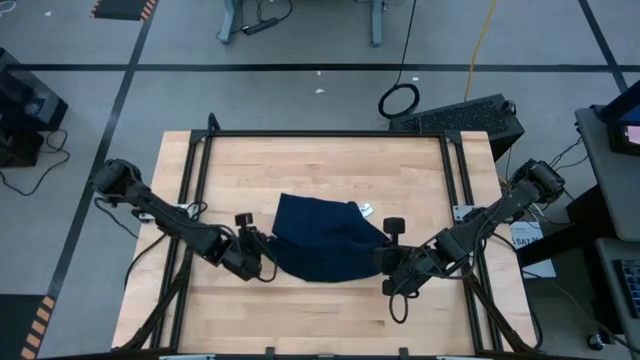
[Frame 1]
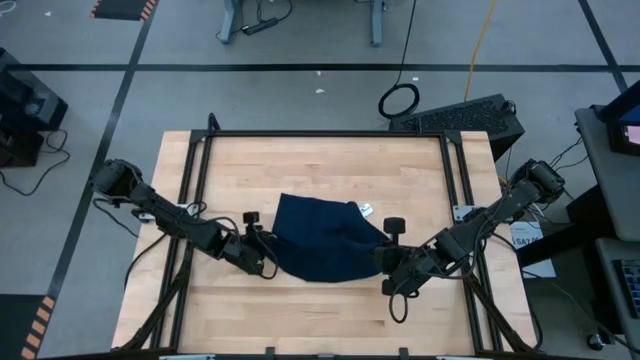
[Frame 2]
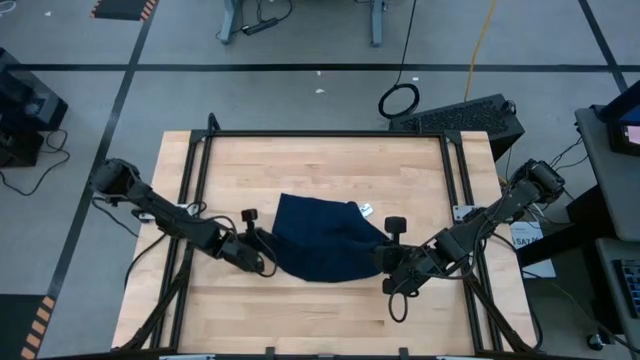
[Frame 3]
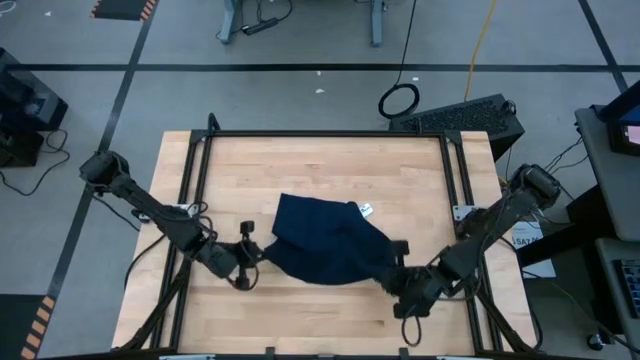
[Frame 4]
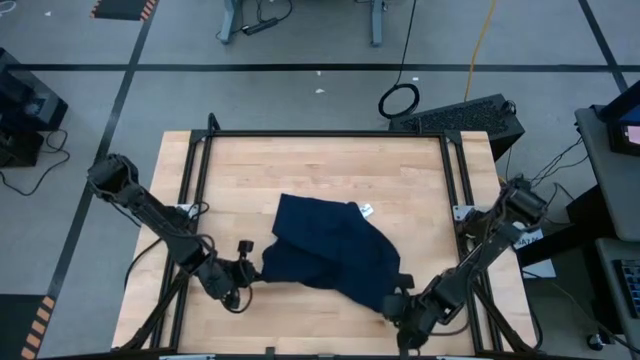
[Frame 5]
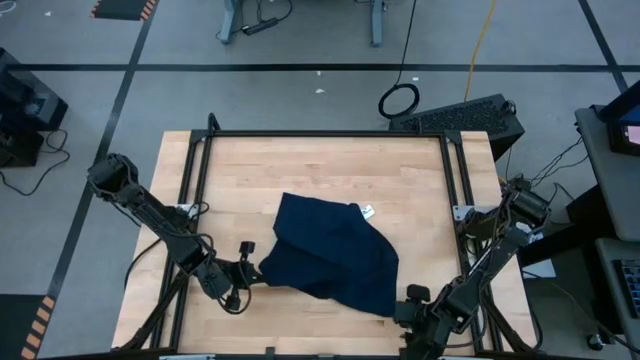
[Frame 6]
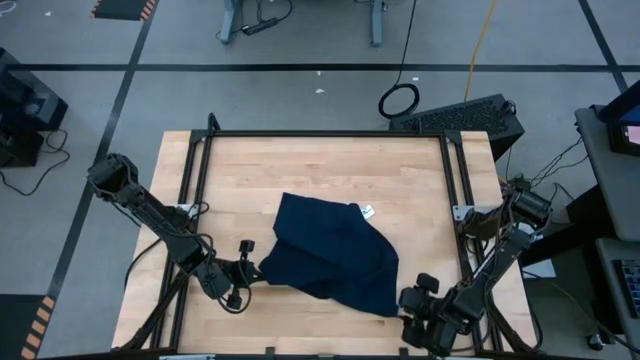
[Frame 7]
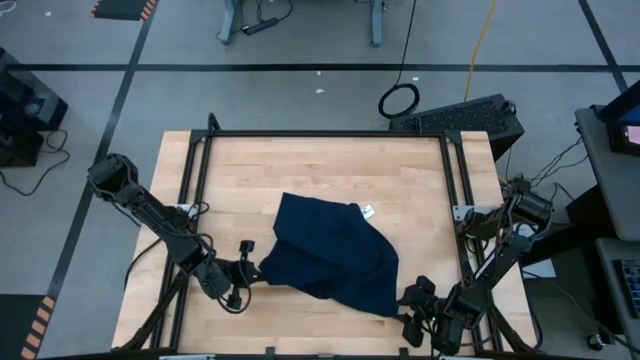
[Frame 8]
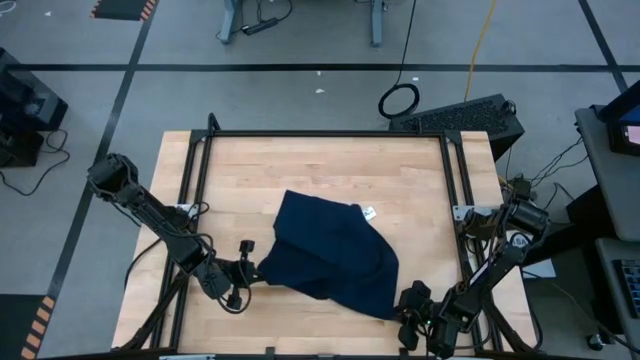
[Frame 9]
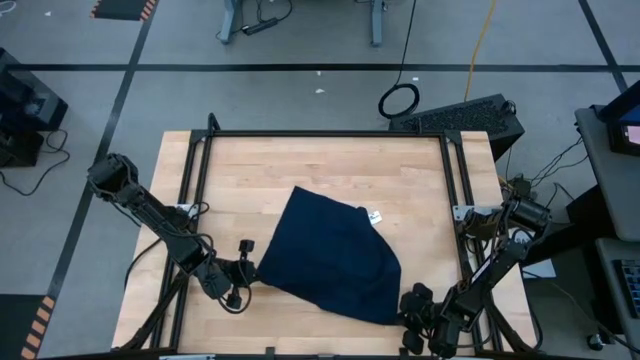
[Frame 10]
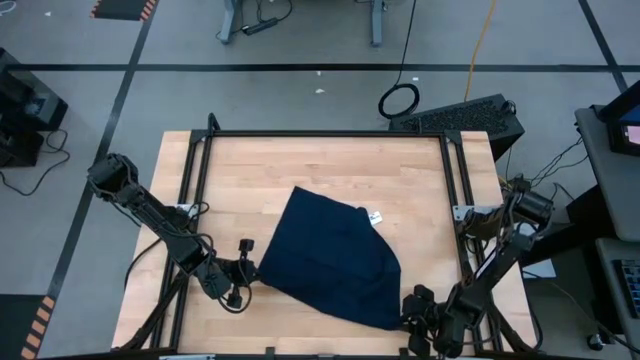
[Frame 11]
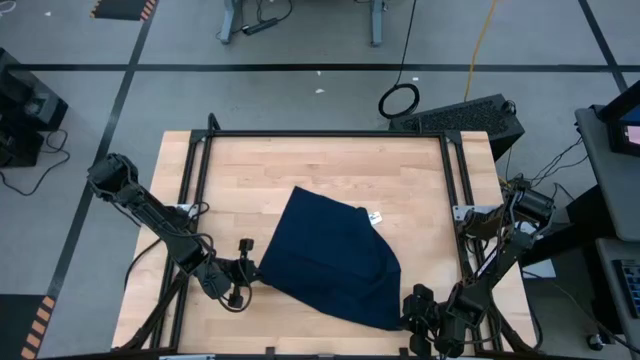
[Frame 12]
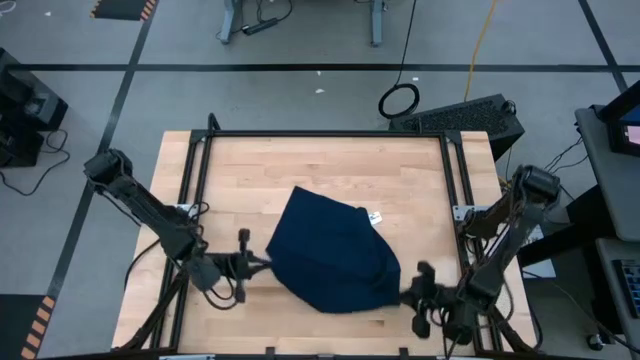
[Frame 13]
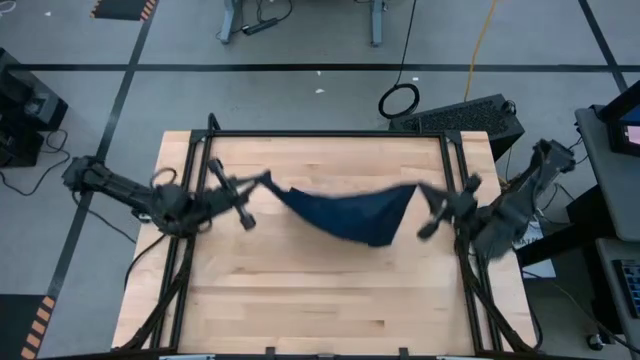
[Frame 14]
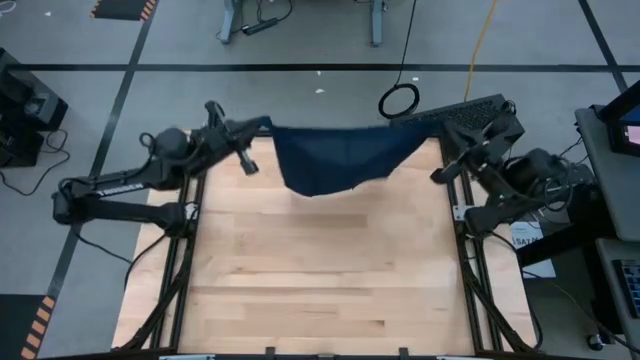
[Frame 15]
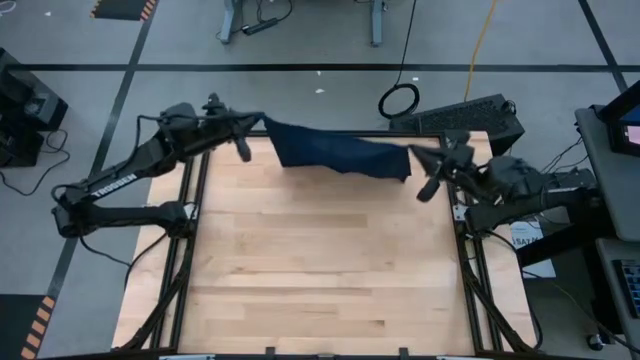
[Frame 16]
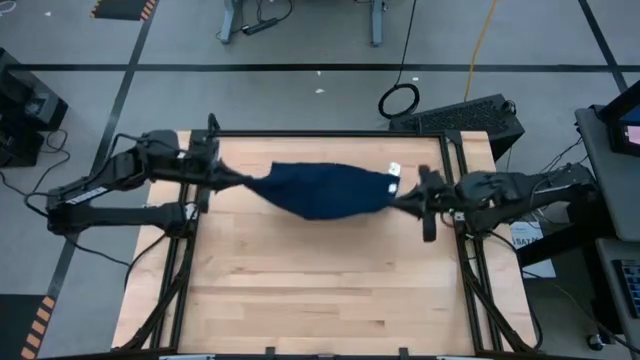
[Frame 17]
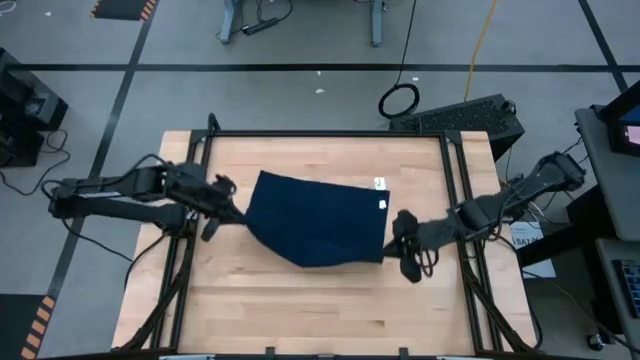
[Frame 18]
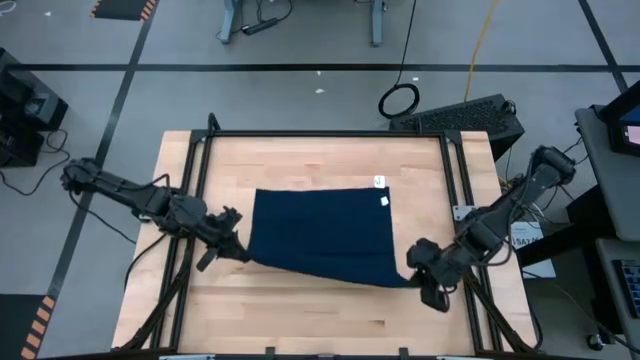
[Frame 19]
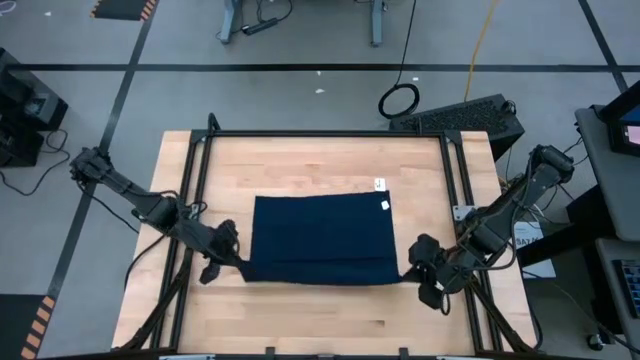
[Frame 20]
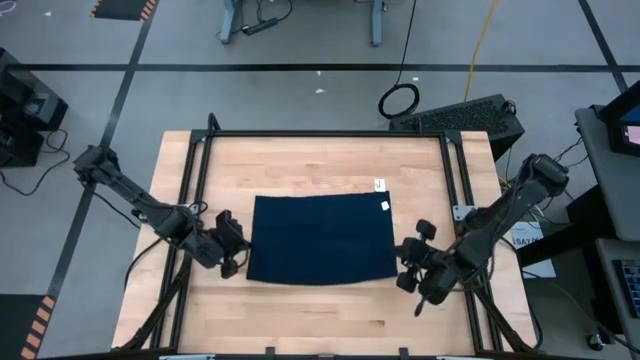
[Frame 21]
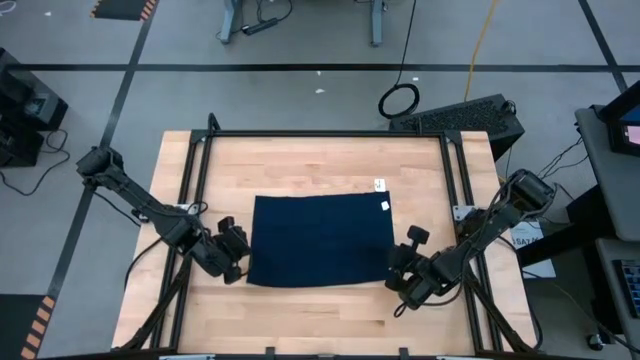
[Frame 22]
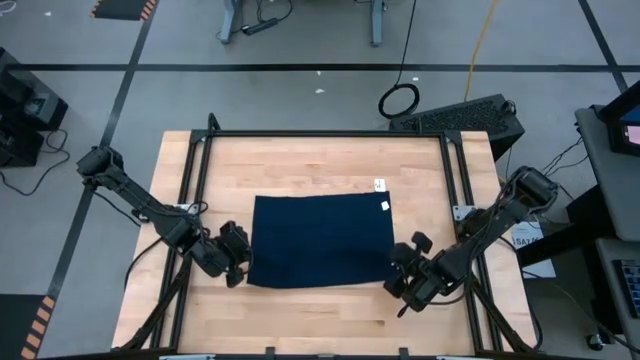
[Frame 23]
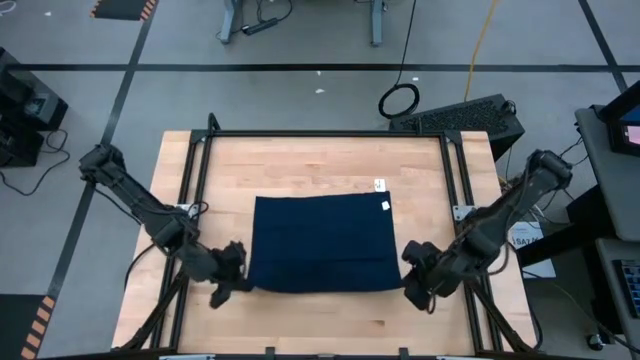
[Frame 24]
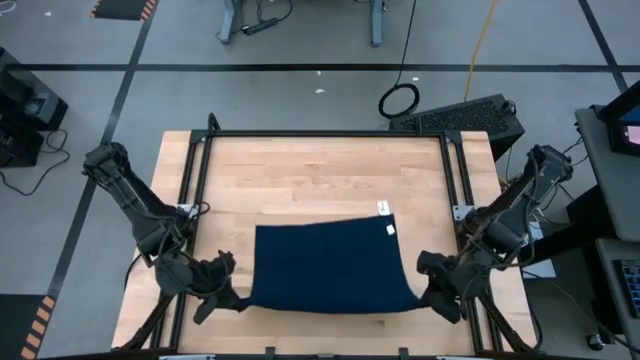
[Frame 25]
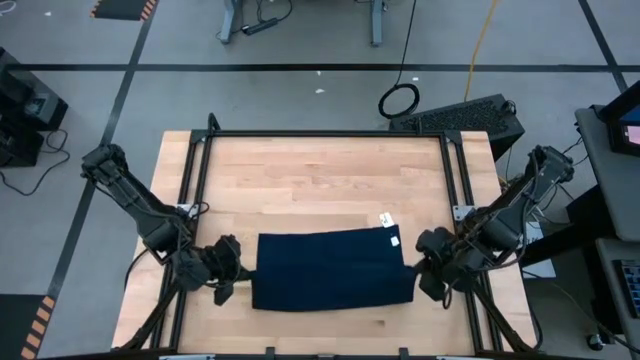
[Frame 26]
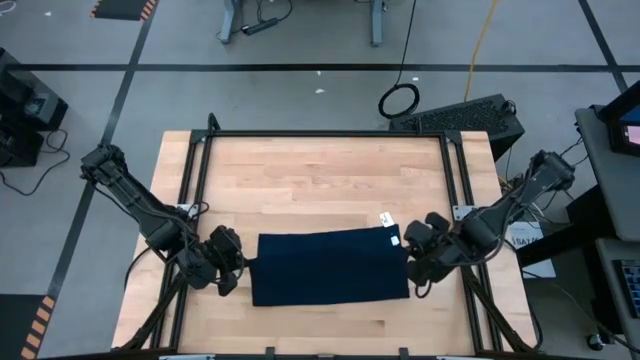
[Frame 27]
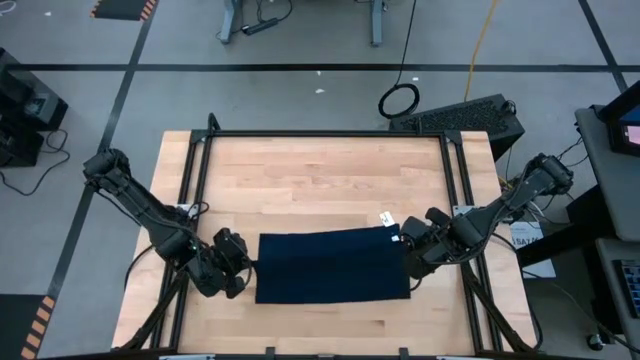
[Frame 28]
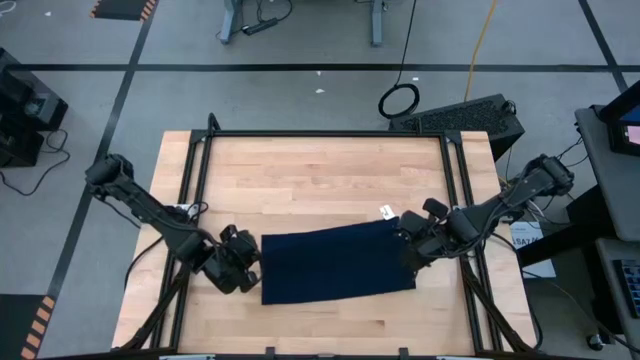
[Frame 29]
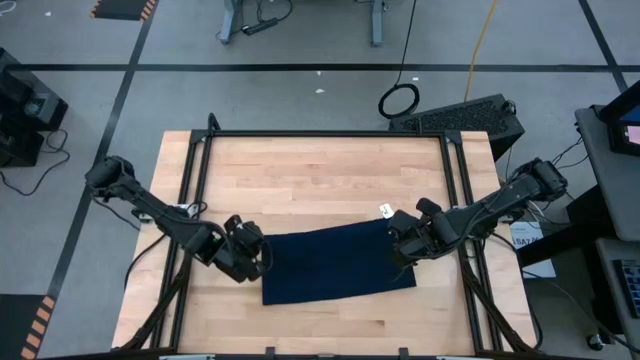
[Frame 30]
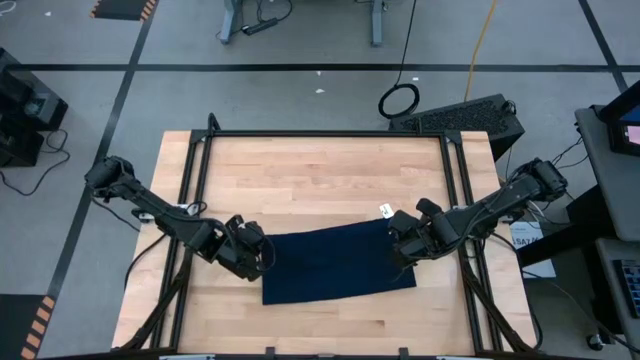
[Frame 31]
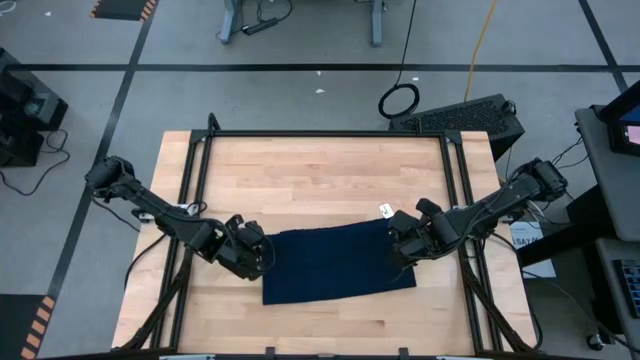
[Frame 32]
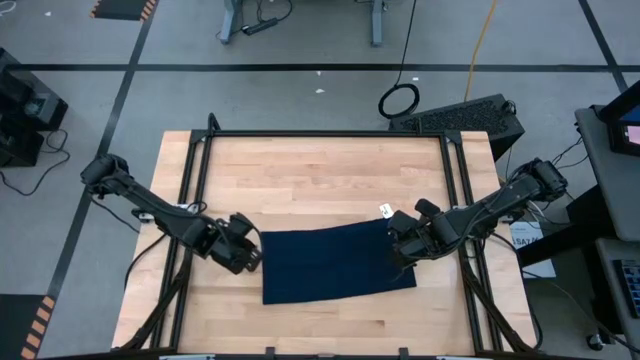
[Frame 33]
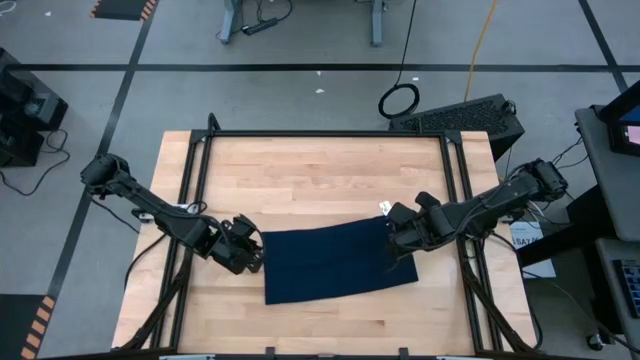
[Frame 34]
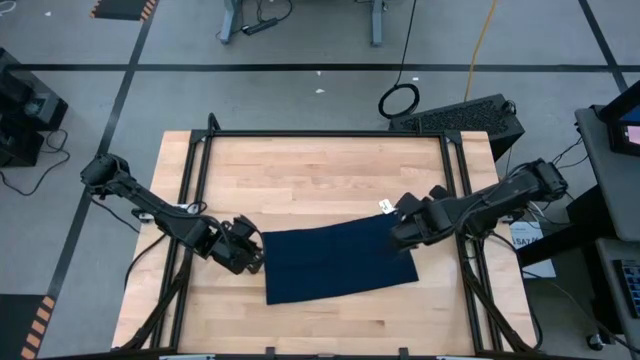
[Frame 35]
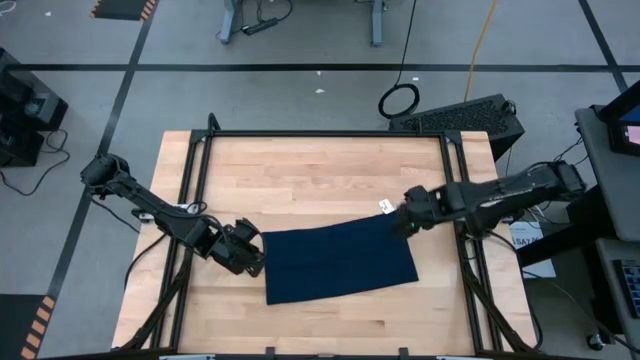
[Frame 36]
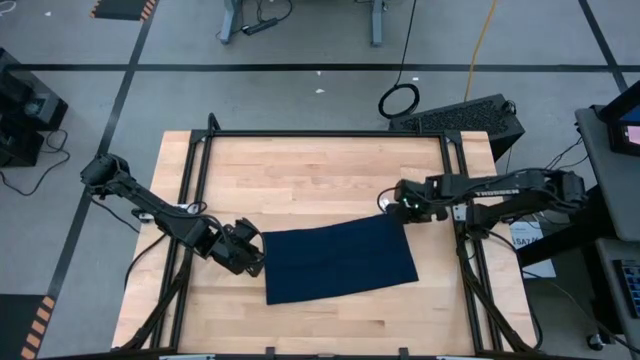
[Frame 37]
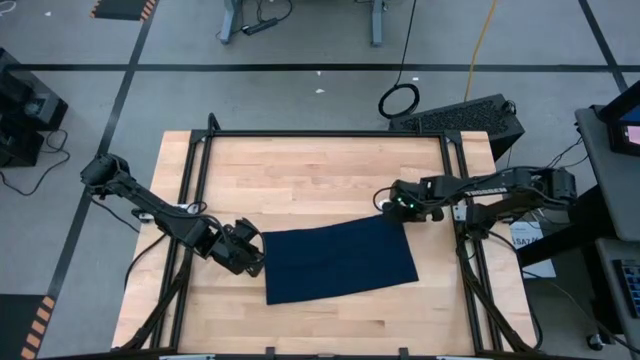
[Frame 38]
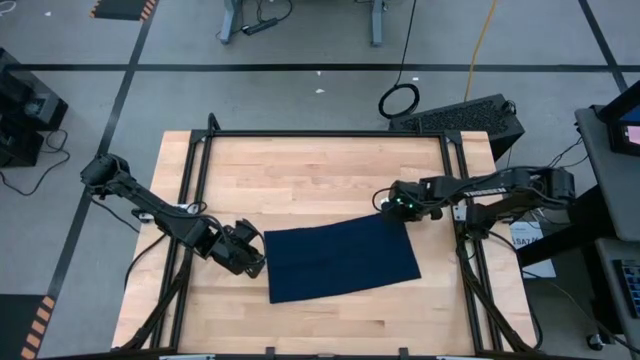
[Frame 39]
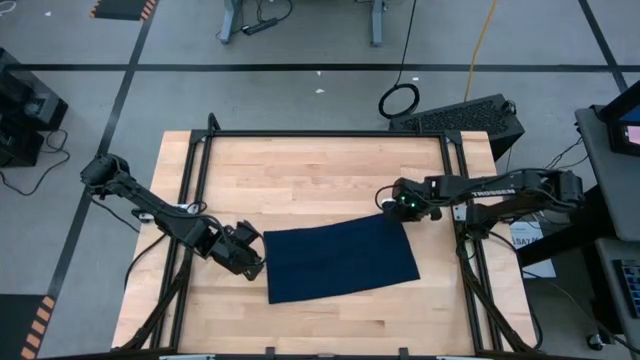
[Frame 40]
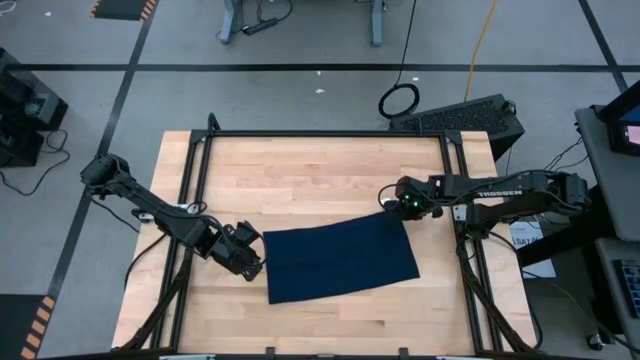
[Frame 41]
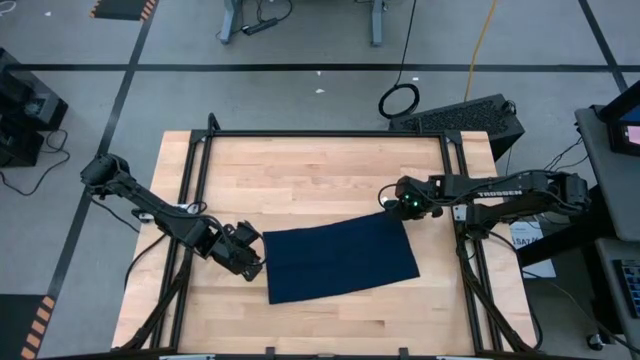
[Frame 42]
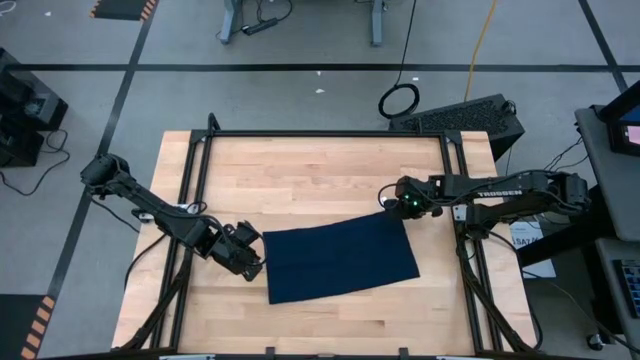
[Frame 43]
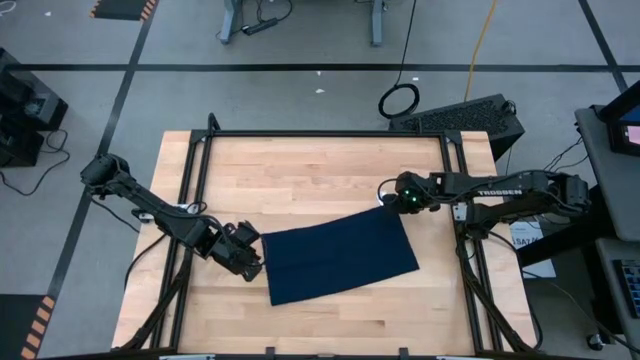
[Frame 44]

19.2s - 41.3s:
Task: Roll towel
Roll the dark blue towel
